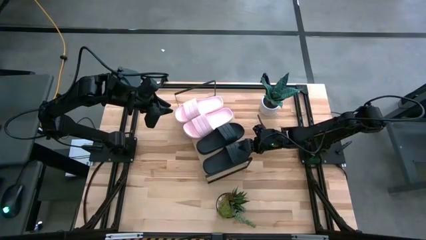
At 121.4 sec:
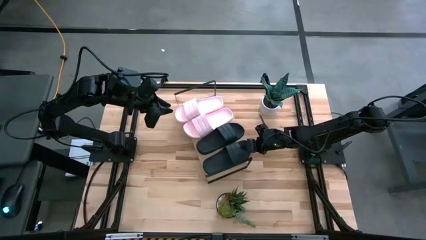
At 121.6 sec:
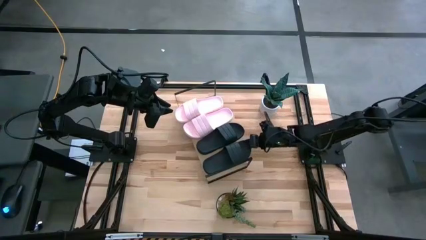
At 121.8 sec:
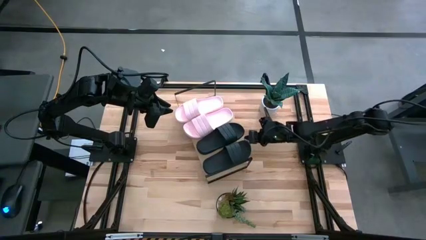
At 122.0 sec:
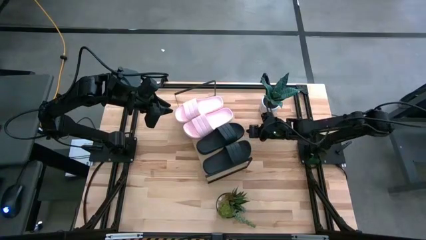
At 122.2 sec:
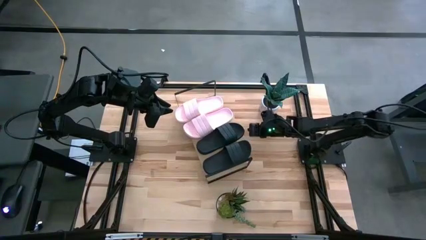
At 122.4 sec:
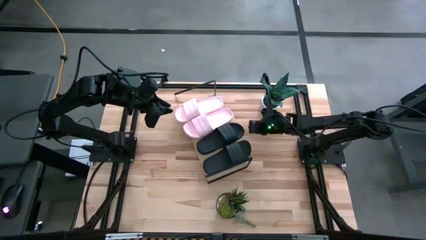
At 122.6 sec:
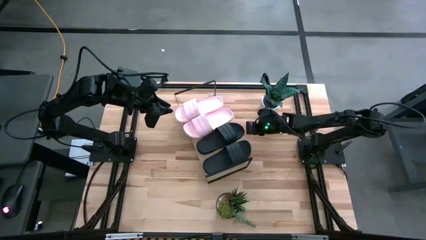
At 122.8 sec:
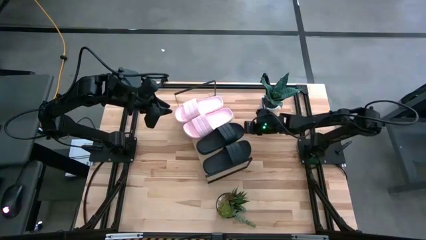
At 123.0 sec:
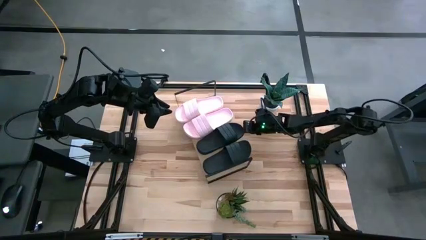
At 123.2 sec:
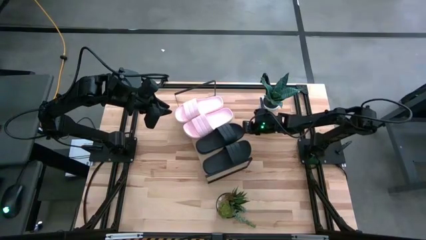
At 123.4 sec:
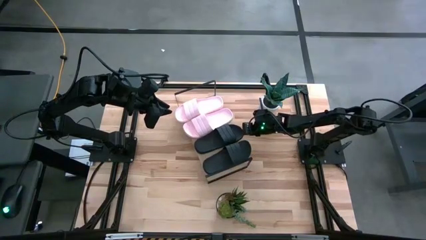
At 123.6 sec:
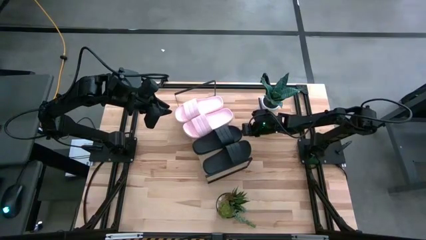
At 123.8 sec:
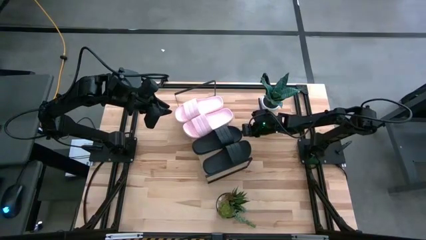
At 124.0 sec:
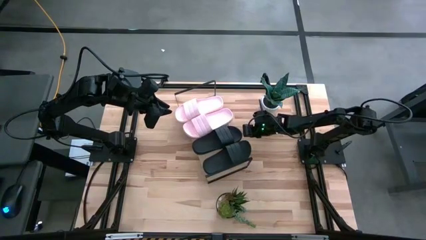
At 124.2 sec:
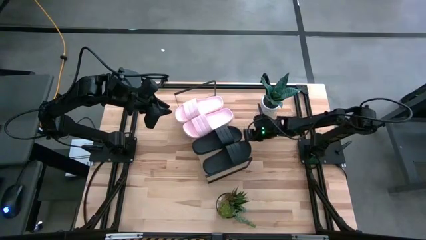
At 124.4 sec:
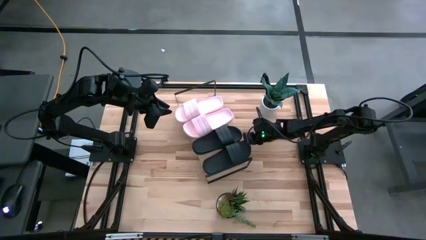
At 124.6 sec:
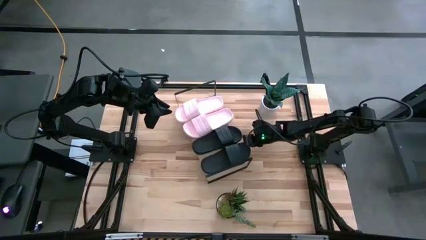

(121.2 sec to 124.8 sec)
Task: Pick and place slides into the shelf
Adjust the black slides on the shelf

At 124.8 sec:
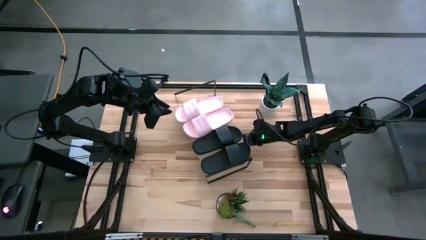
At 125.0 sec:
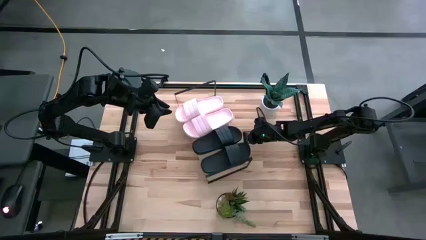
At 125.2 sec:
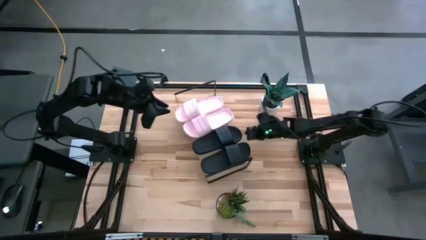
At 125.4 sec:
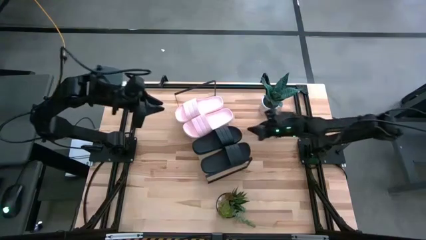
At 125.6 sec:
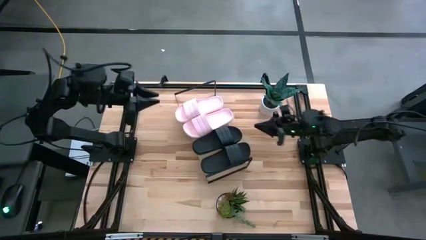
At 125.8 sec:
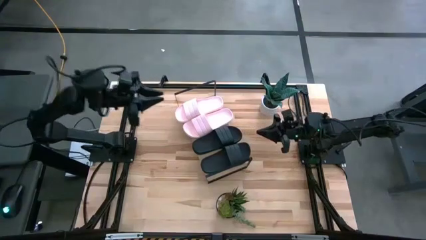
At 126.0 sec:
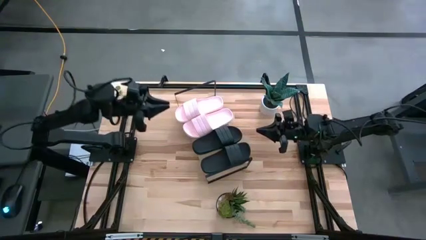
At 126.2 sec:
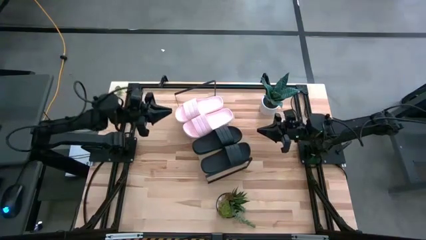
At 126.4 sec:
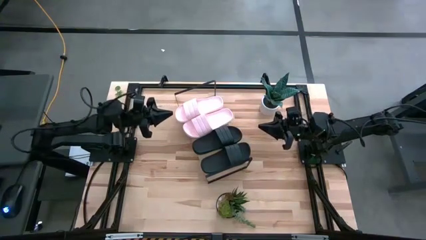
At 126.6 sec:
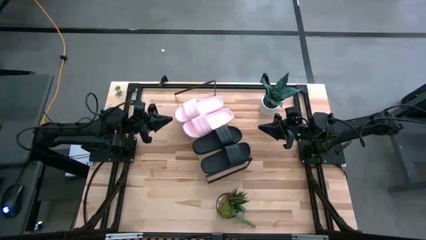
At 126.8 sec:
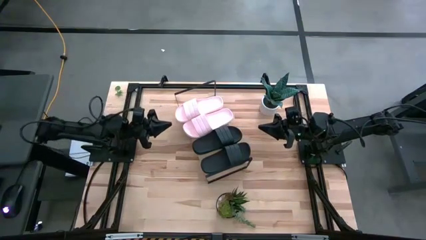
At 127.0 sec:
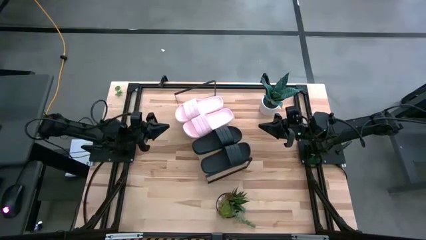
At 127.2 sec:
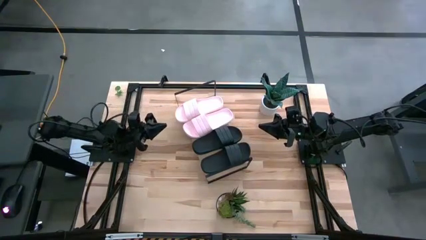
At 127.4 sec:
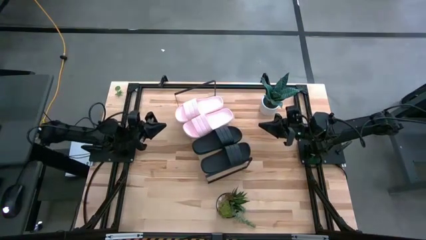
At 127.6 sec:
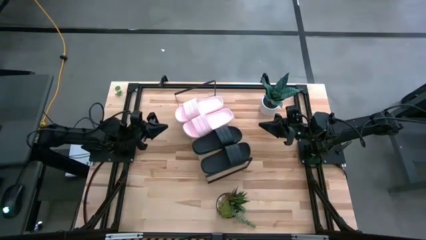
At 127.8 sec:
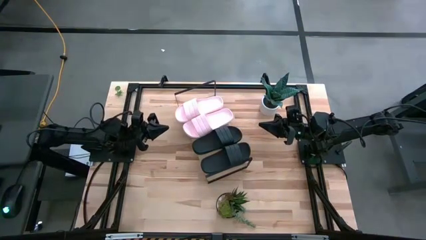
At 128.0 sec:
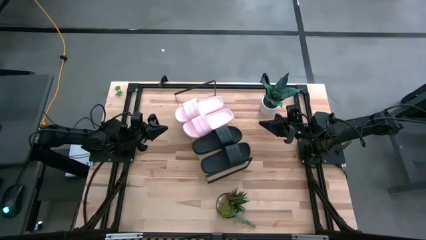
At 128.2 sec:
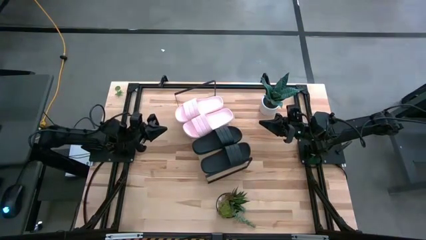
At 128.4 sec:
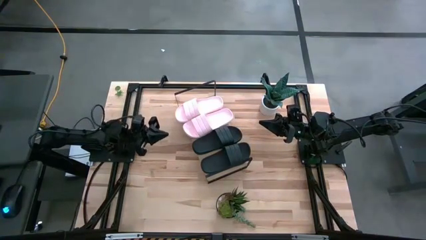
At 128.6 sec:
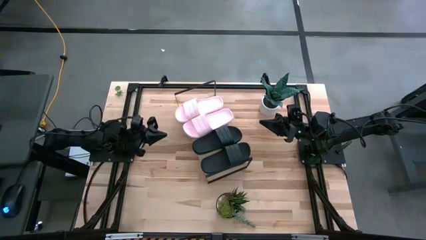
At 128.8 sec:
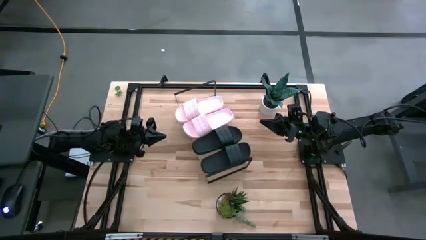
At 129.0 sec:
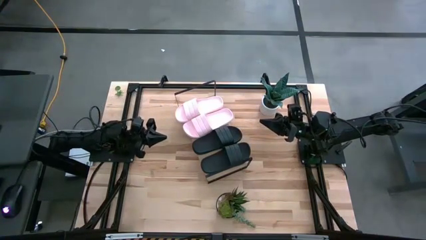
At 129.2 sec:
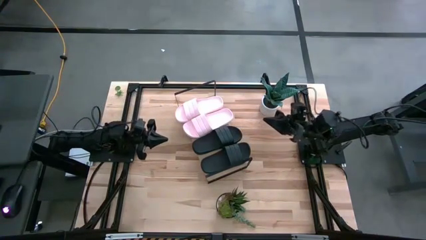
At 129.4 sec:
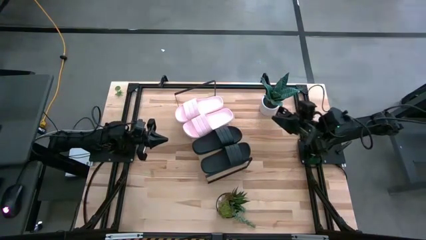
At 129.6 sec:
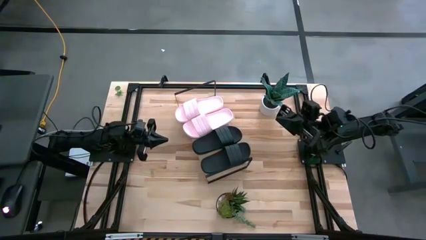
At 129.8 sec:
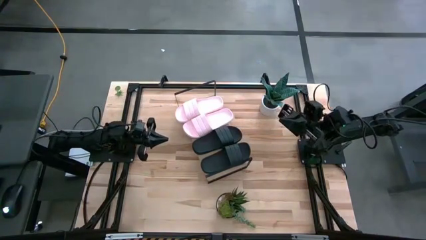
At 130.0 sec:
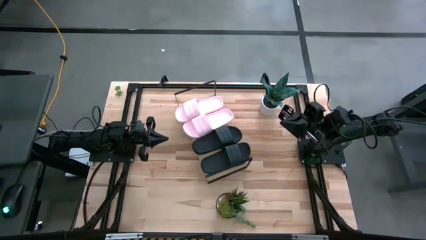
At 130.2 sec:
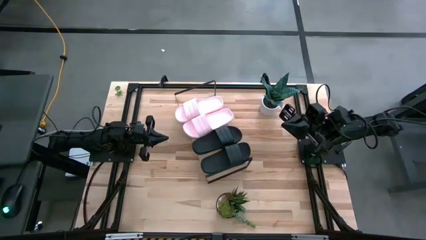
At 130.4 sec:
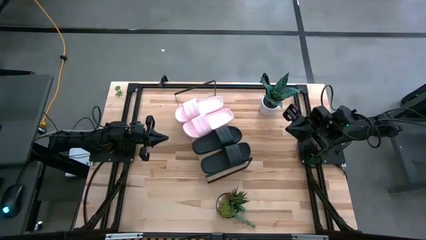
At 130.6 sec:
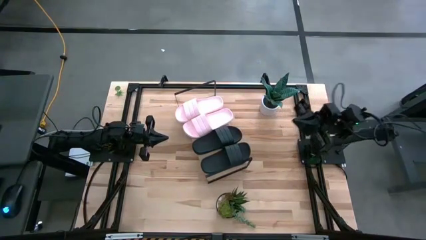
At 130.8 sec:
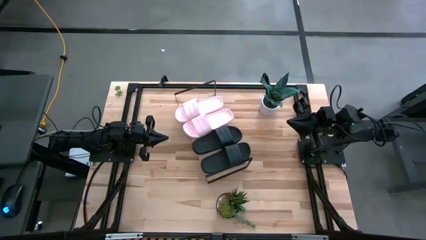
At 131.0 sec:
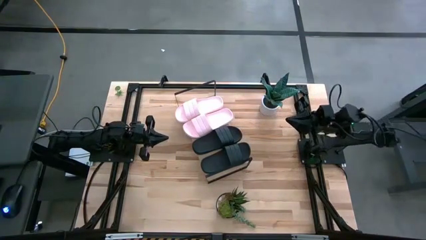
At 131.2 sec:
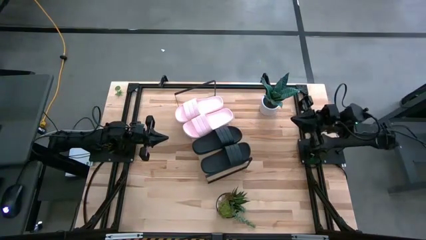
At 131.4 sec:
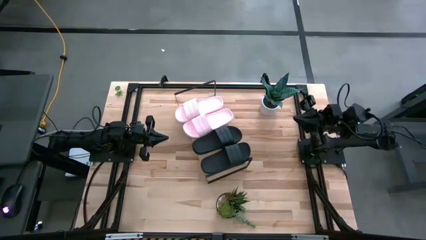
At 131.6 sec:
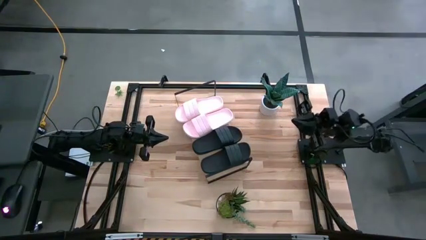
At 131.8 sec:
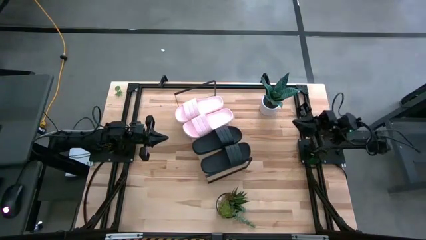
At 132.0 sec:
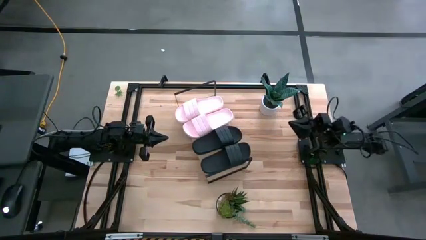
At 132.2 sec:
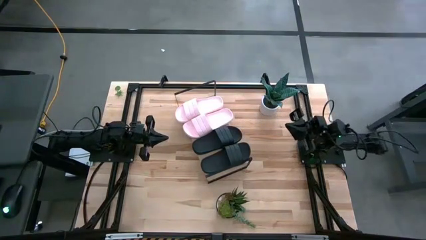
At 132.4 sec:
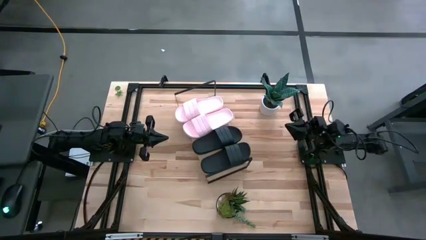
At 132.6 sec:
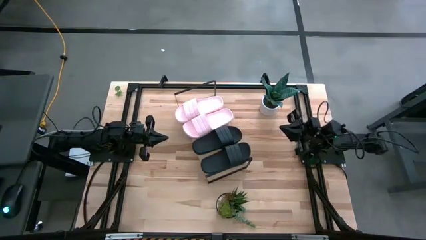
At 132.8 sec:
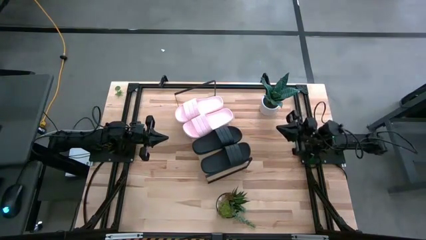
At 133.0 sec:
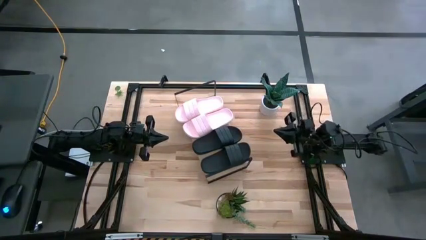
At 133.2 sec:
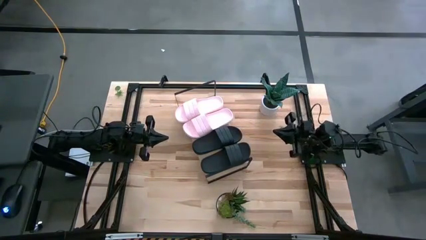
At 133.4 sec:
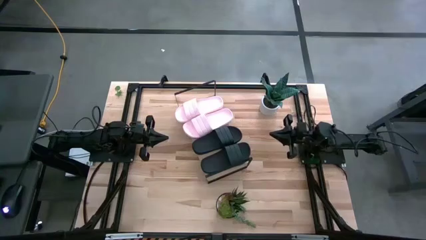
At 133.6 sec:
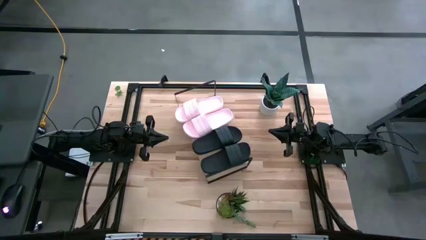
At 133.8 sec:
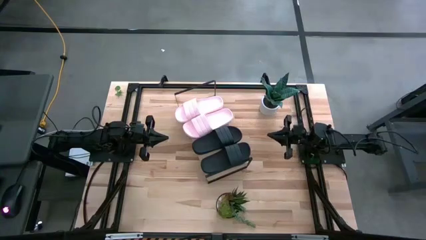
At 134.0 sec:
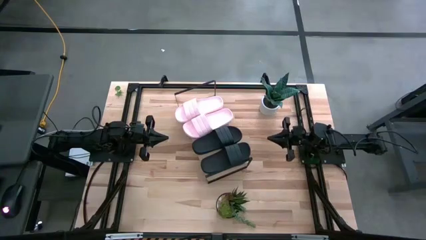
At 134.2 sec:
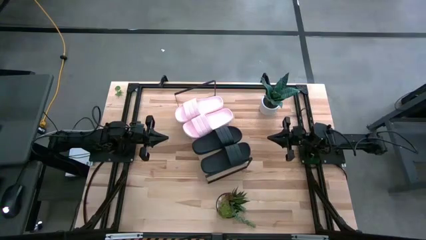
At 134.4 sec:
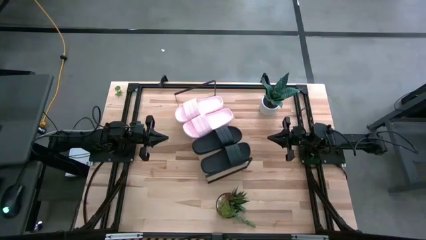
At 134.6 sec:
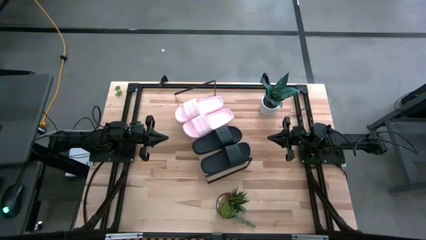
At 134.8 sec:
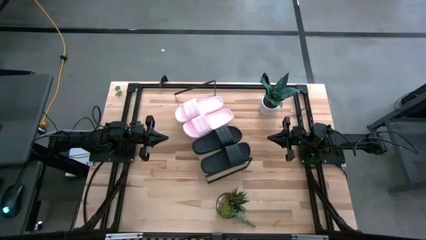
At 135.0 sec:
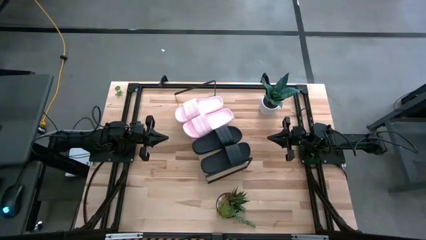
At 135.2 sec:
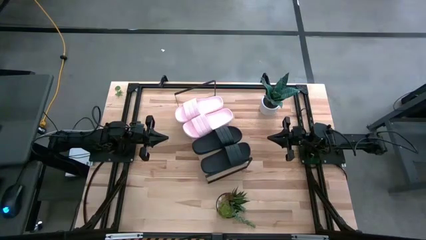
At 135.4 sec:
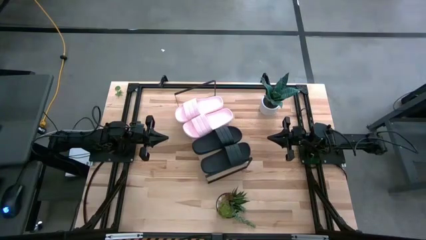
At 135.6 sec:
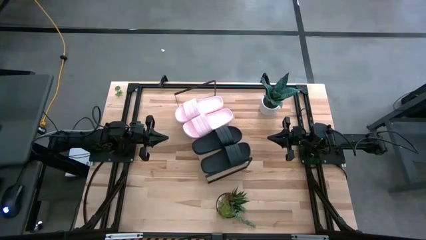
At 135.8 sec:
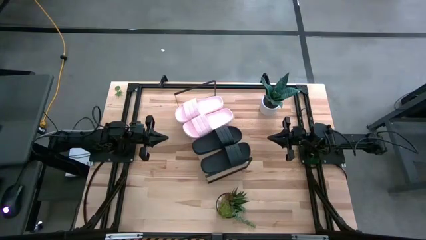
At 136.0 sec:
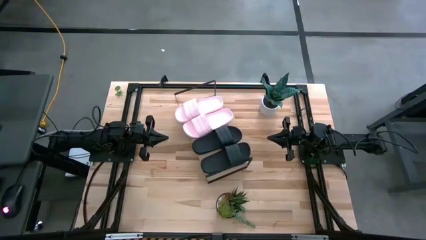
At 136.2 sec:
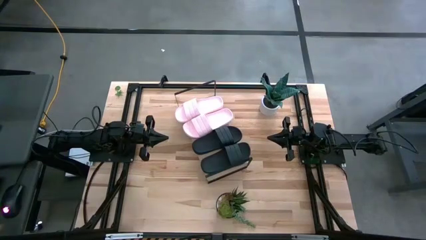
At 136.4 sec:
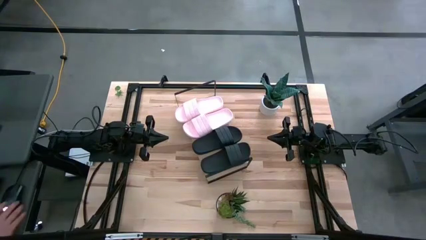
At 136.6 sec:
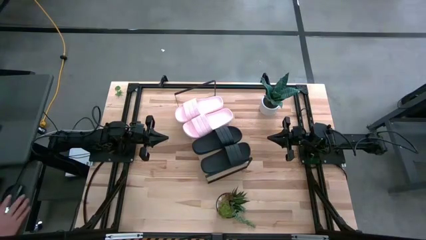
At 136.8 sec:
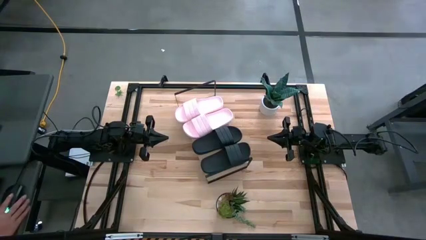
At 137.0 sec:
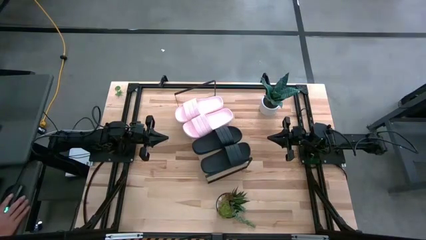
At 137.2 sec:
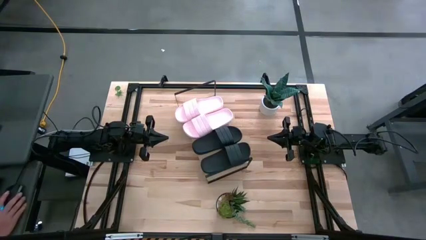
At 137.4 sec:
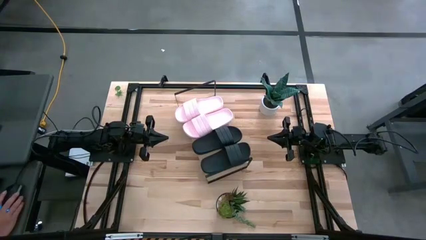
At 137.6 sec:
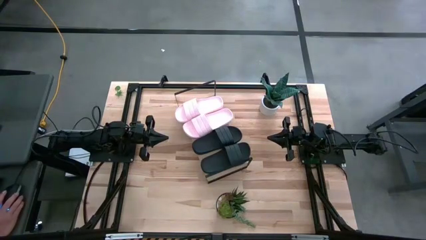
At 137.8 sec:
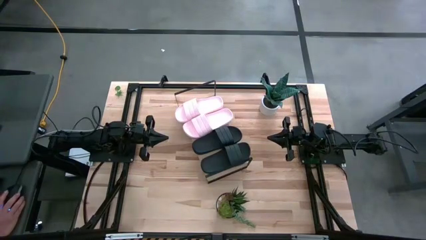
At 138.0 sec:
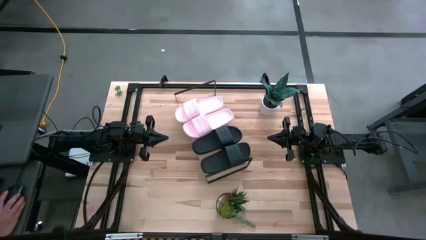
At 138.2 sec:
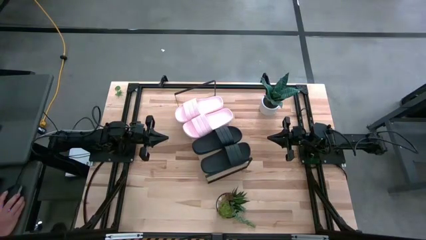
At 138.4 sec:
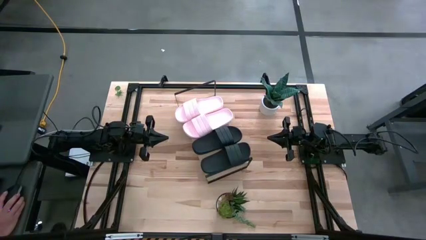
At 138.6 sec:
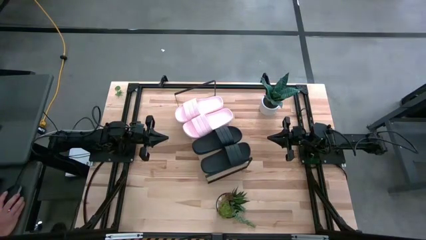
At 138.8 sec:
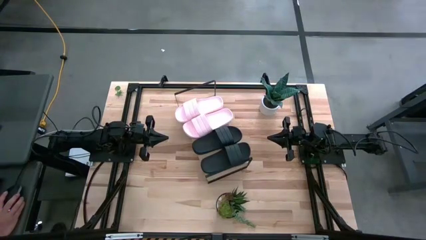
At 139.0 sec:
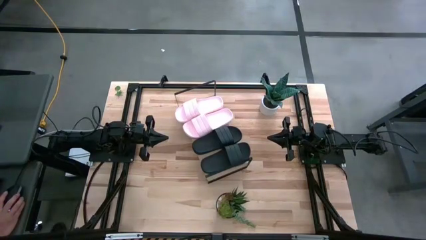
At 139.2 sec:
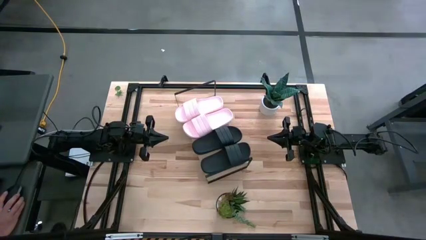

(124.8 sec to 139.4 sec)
Return to Home Position
